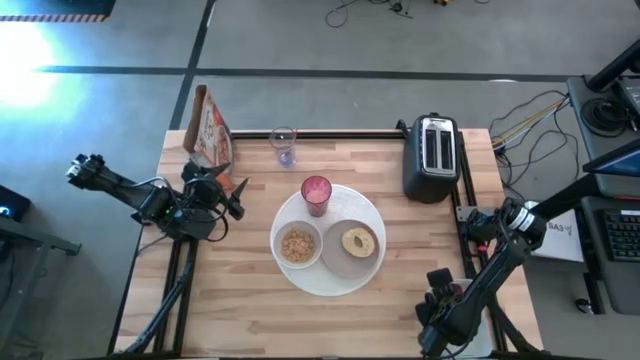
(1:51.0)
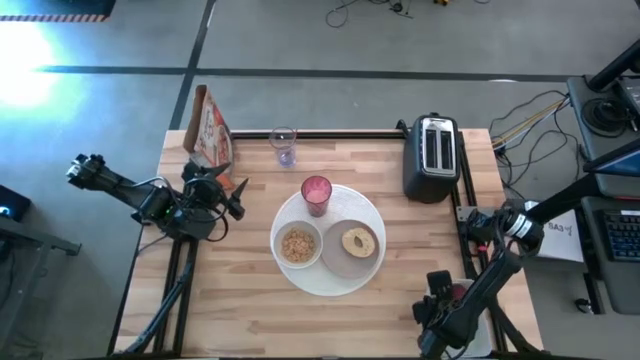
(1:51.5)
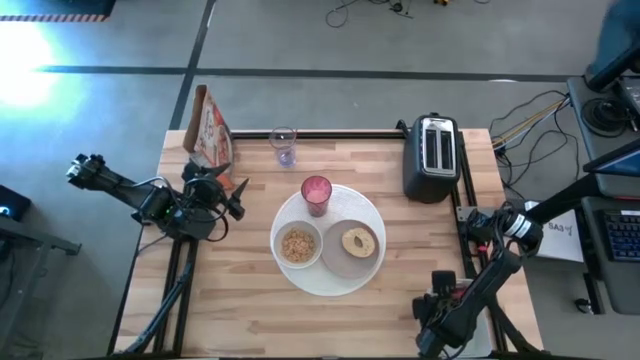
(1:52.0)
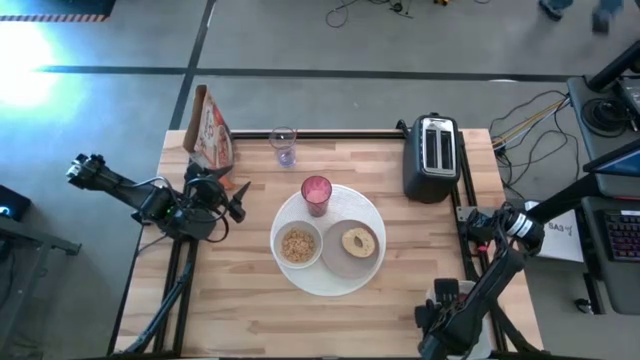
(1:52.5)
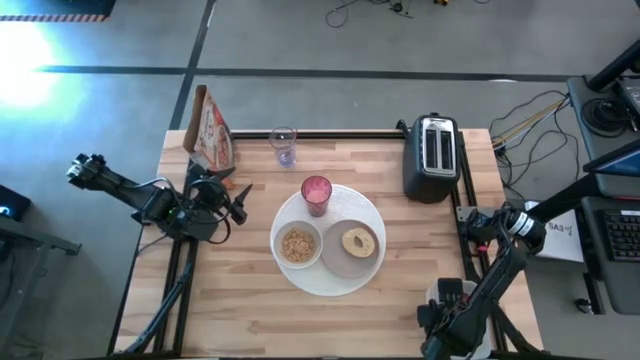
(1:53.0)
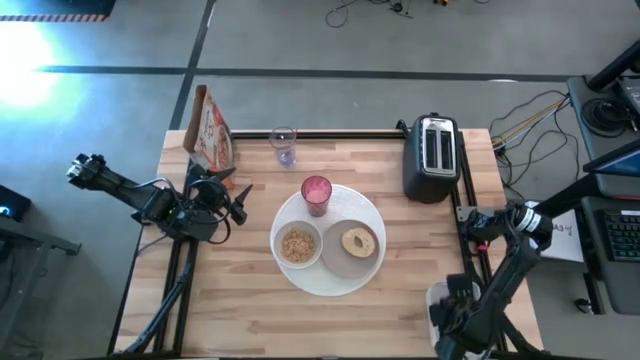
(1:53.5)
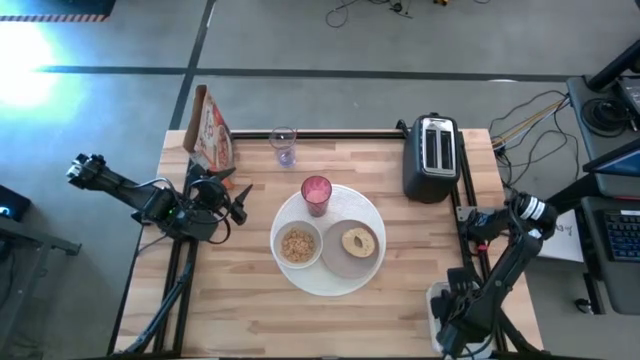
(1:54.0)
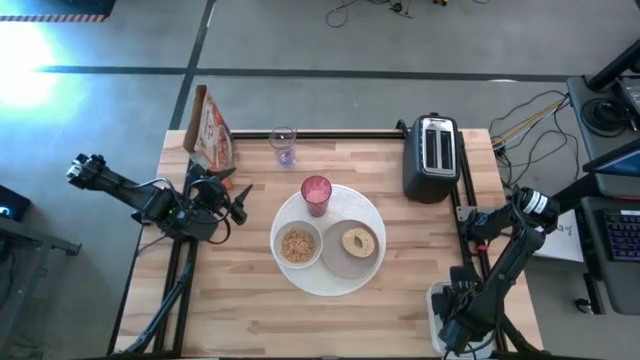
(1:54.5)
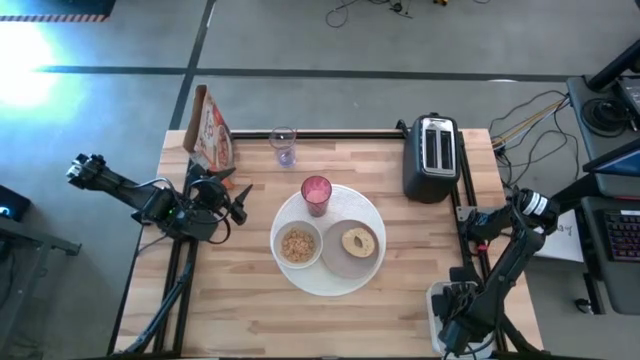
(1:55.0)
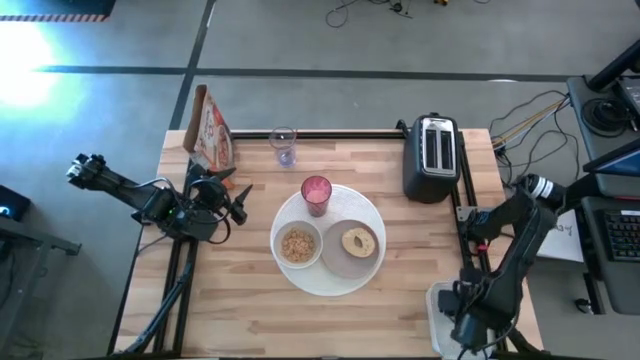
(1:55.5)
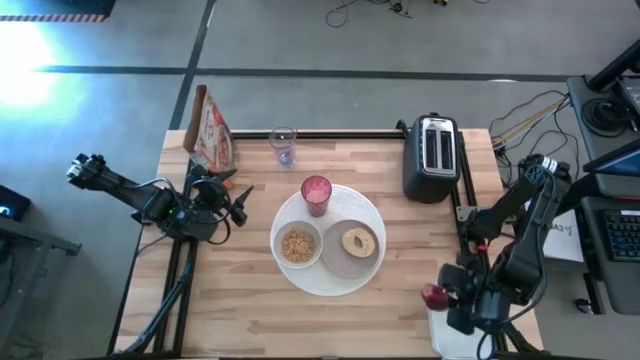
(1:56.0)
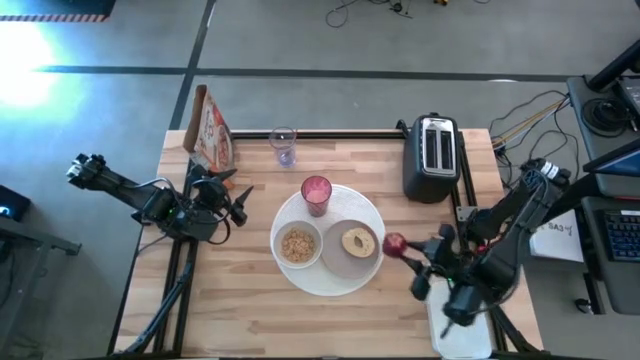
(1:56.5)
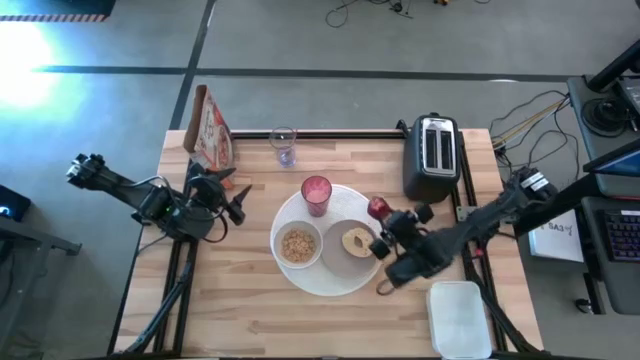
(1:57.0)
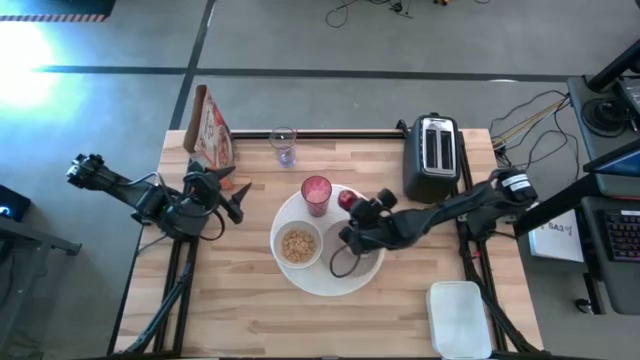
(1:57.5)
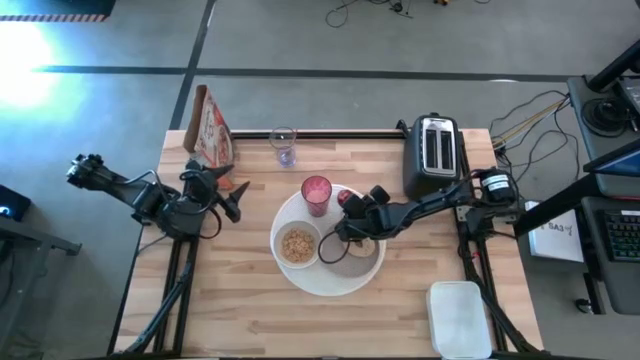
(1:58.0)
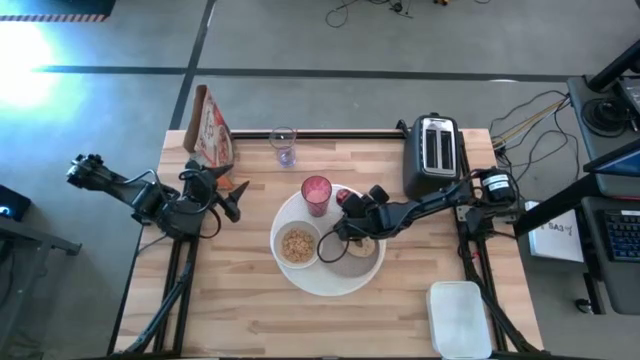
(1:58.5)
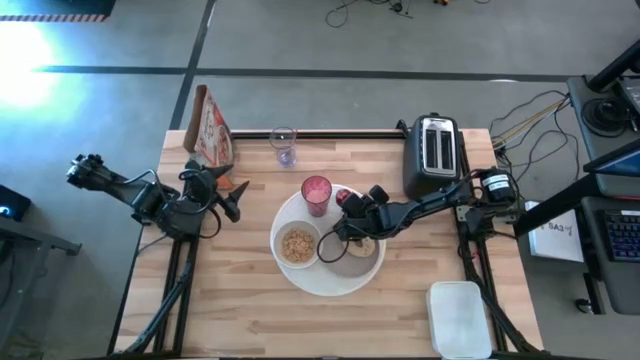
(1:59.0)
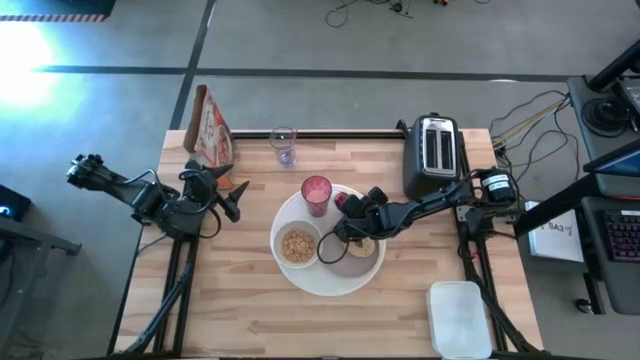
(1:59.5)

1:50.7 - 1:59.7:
Task: Arrange a breakfast setting
Put the red apple to the left of the red cup on the white table mat

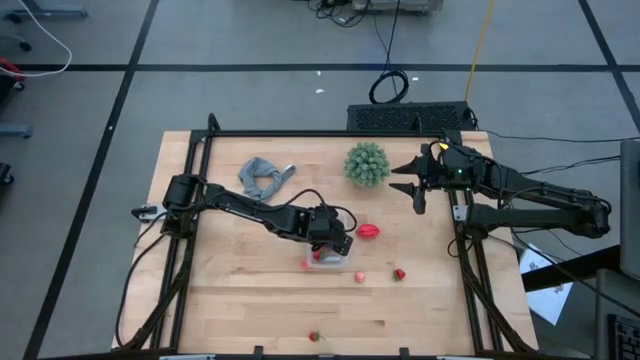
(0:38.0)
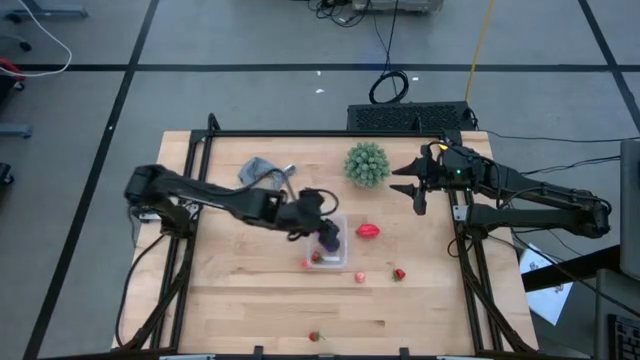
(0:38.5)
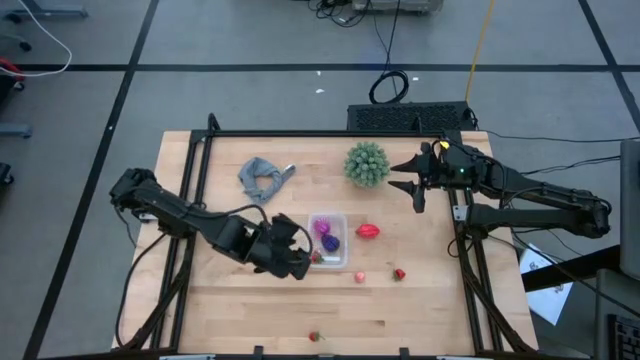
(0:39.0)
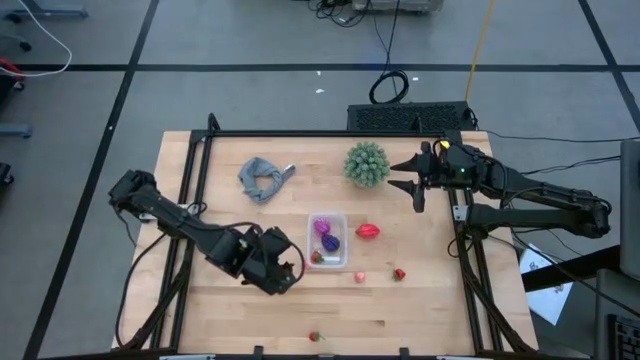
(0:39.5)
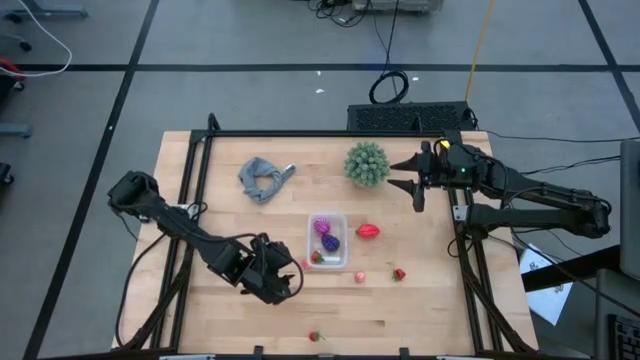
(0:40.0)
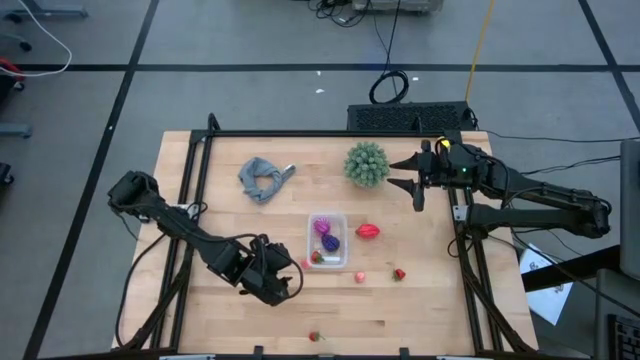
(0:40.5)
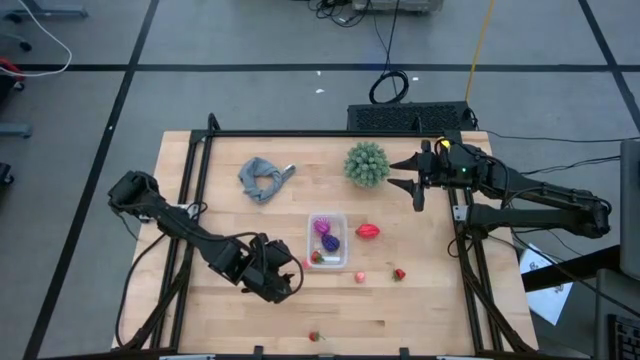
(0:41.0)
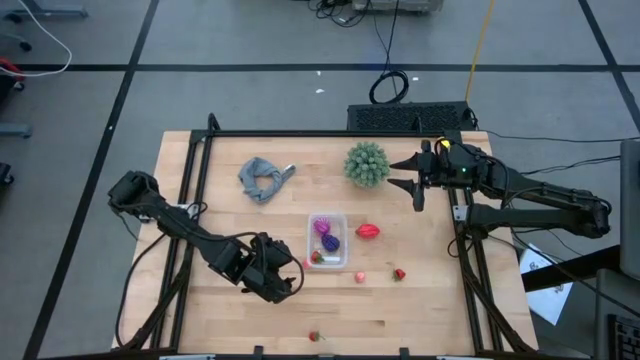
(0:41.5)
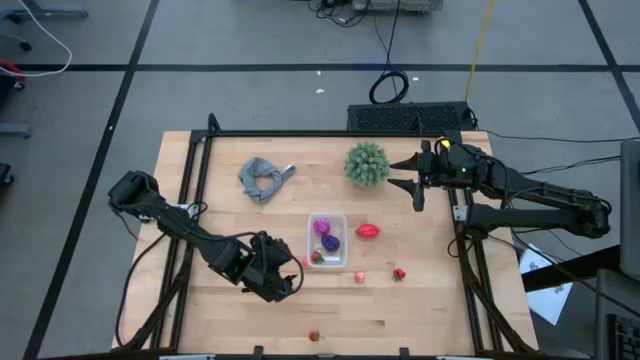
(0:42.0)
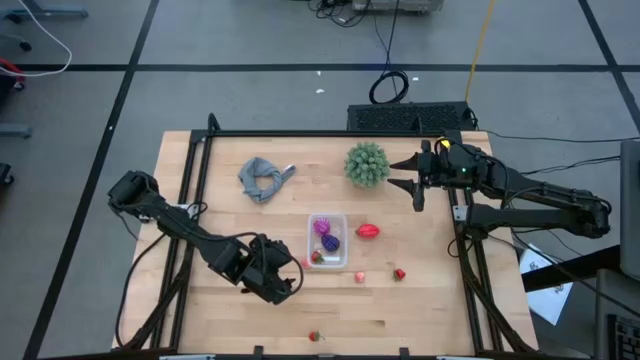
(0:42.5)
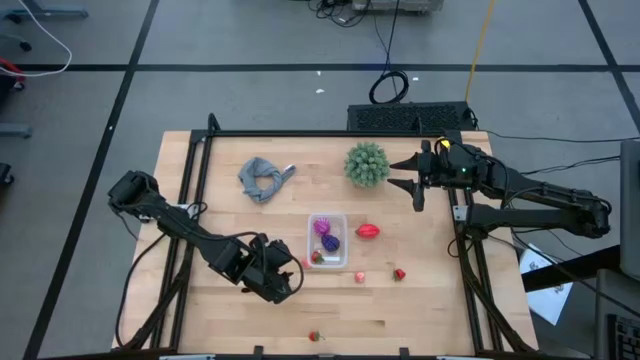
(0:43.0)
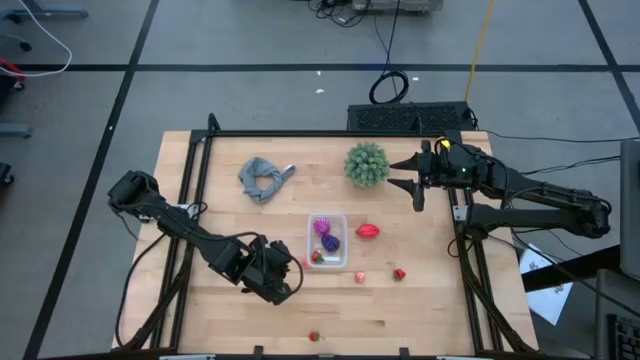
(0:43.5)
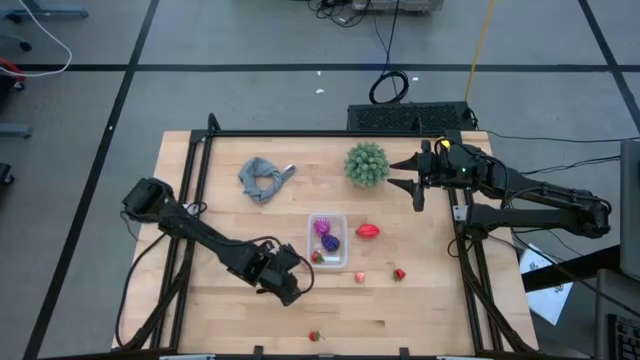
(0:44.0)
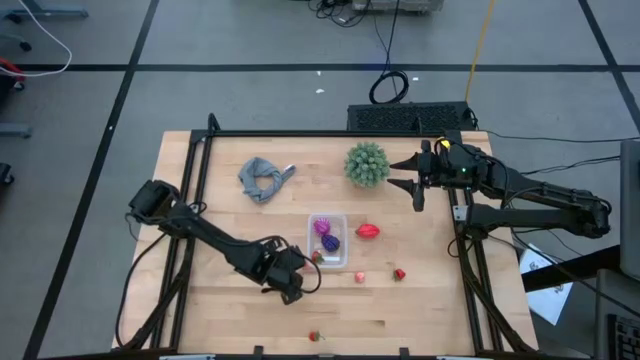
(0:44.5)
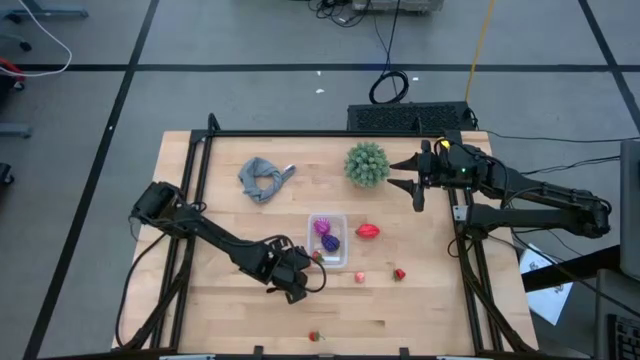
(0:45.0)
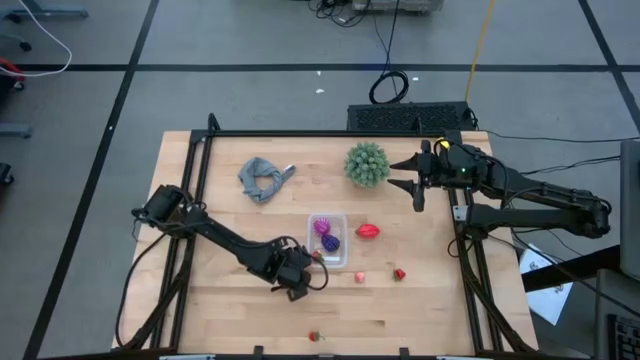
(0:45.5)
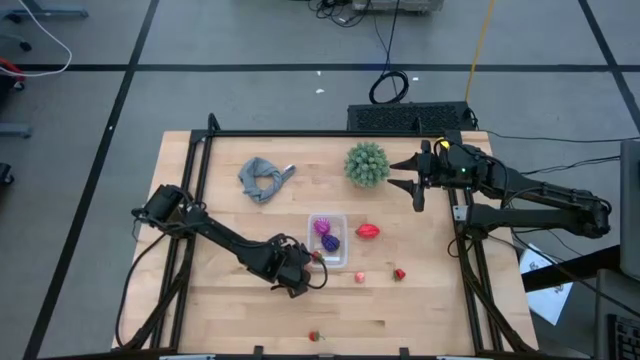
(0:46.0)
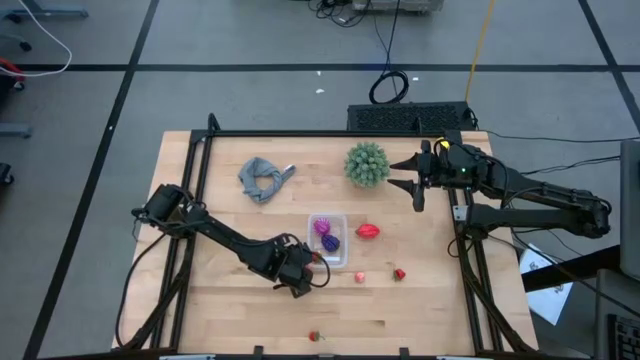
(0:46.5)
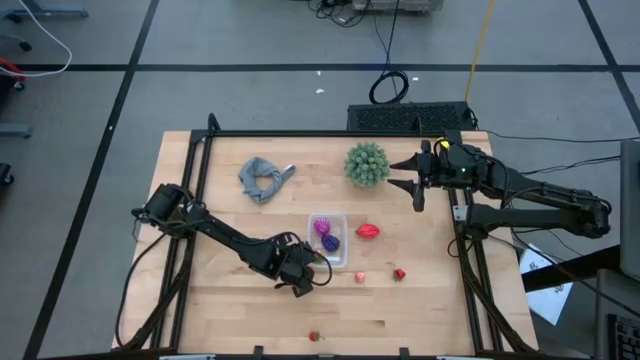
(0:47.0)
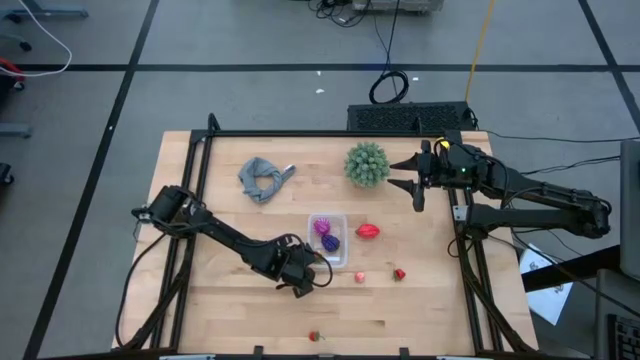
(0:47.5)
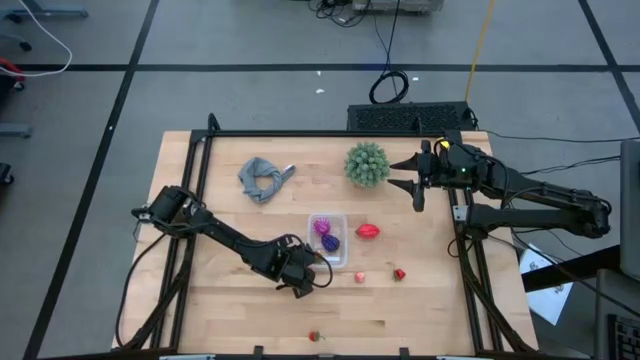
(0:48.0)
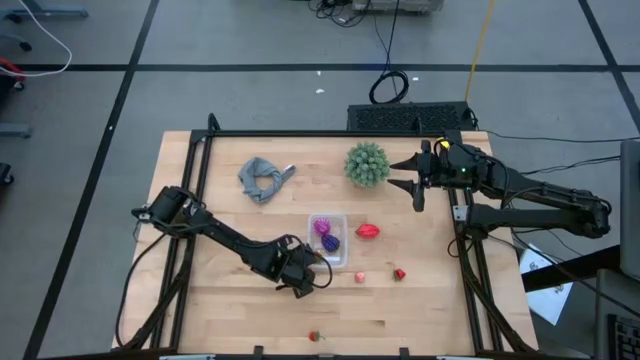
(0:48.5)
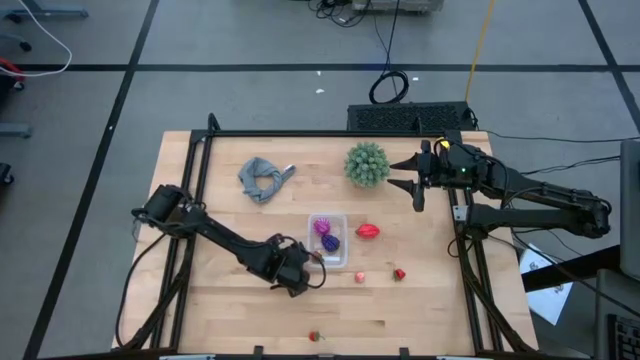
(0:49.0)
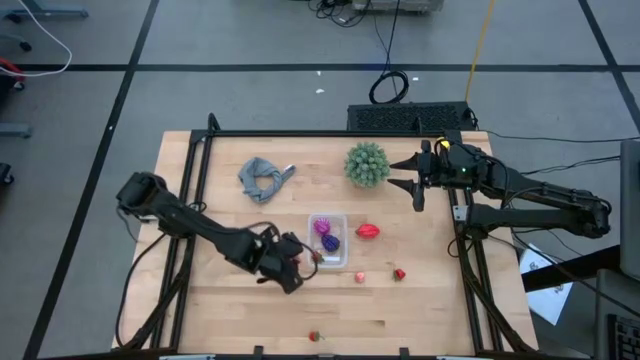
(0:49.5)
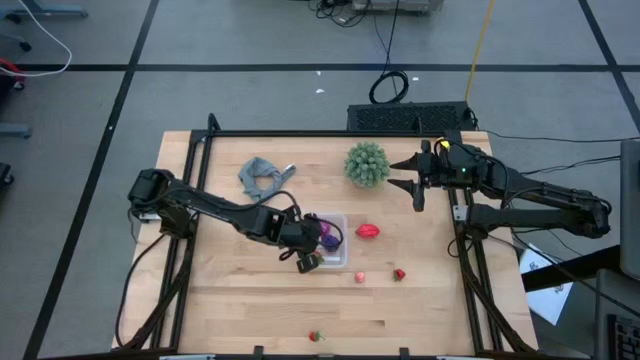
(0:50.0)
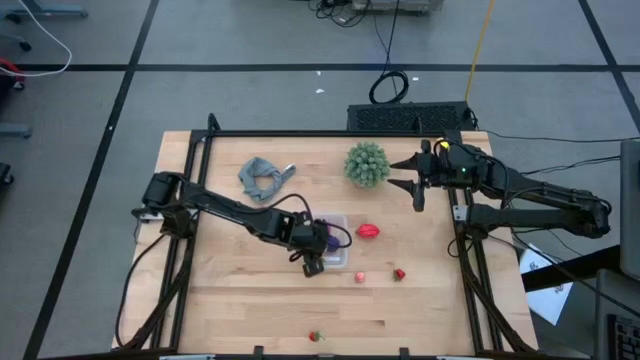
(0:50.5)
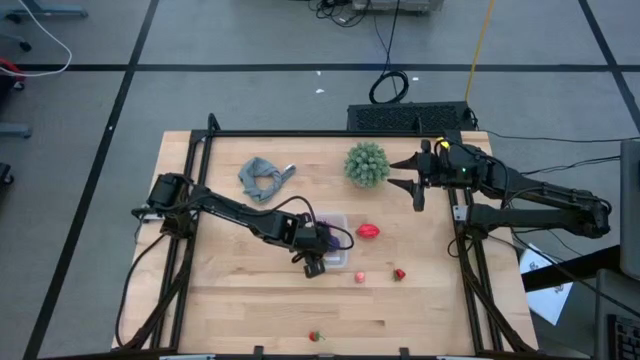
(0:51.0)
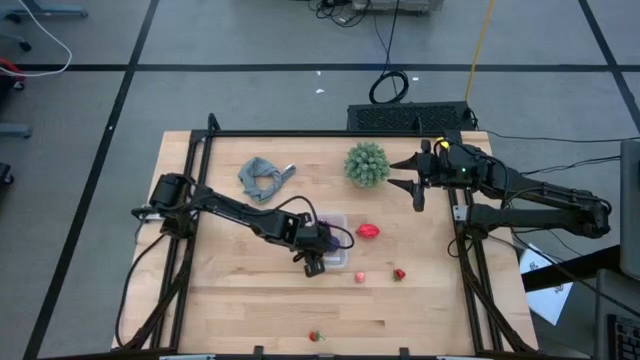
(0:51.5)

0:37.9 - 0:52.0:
Task: Pick and placing Produce into tupperware
Put the left apricot into the transparent bin
